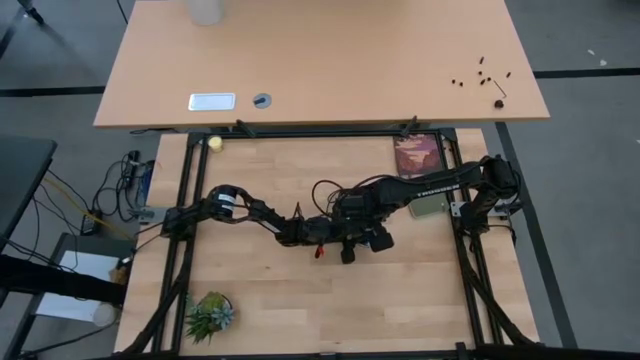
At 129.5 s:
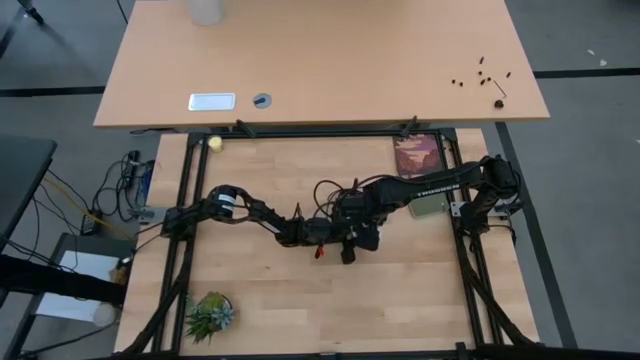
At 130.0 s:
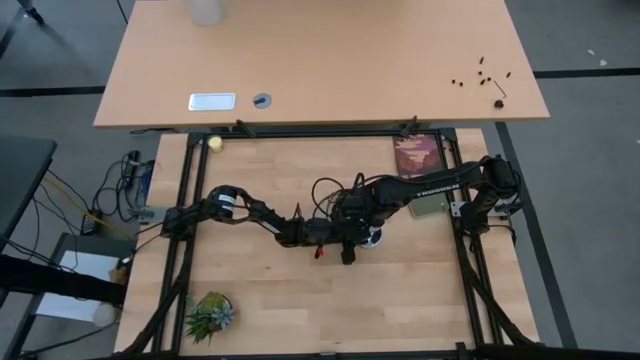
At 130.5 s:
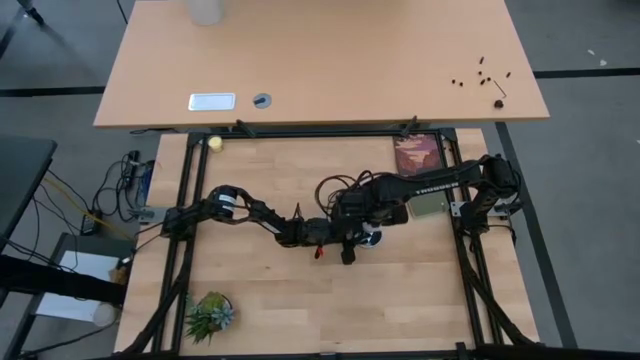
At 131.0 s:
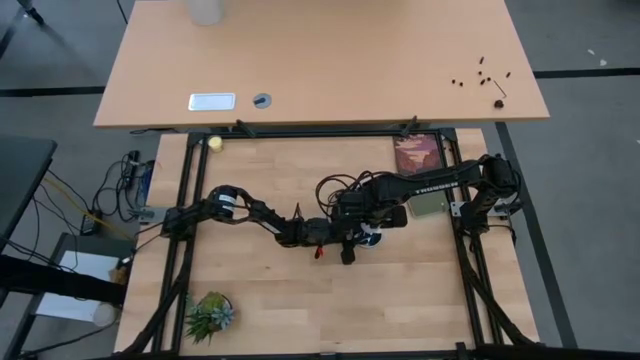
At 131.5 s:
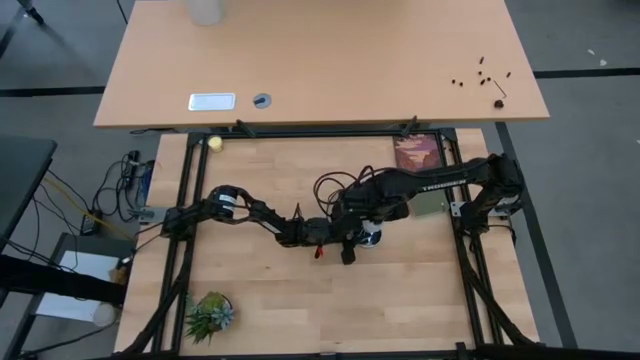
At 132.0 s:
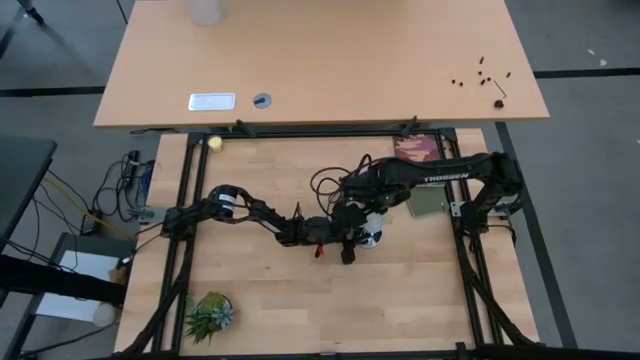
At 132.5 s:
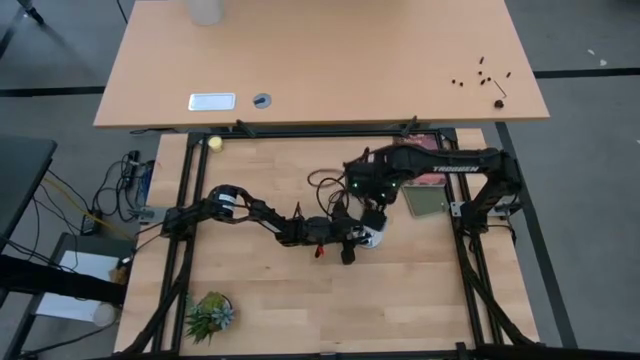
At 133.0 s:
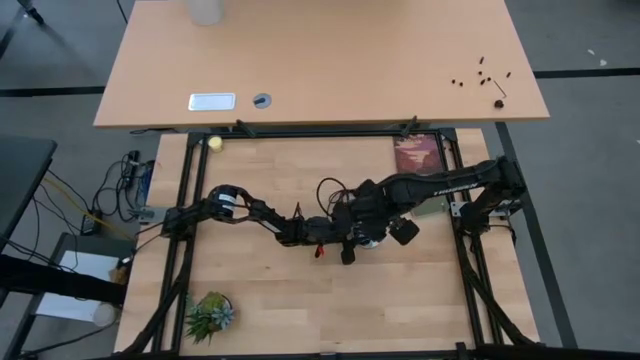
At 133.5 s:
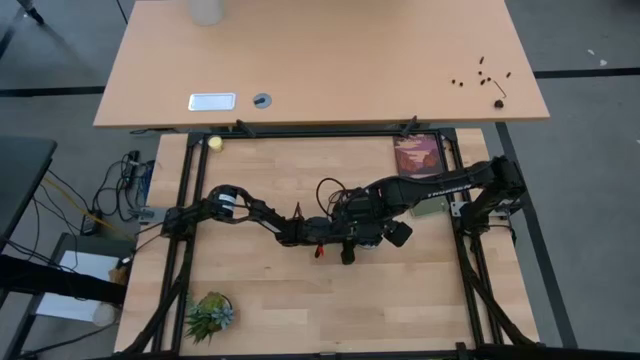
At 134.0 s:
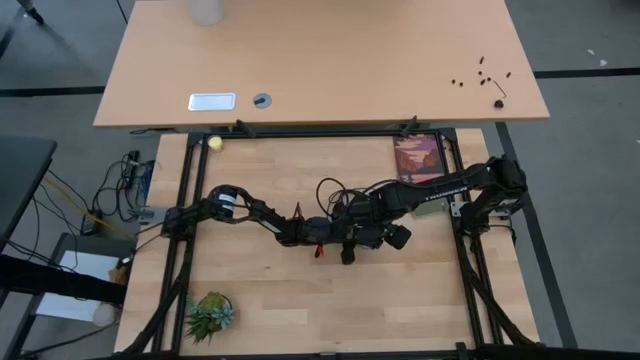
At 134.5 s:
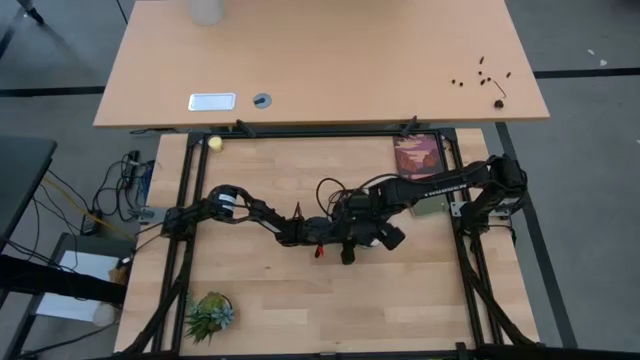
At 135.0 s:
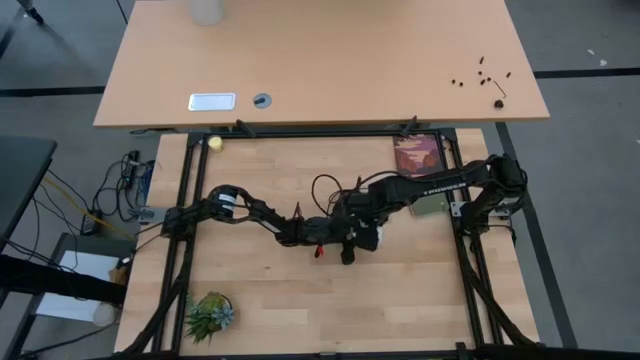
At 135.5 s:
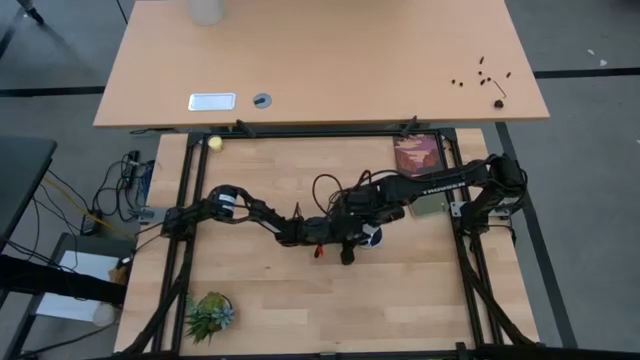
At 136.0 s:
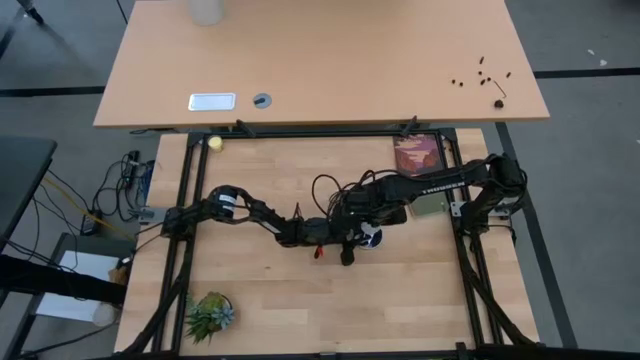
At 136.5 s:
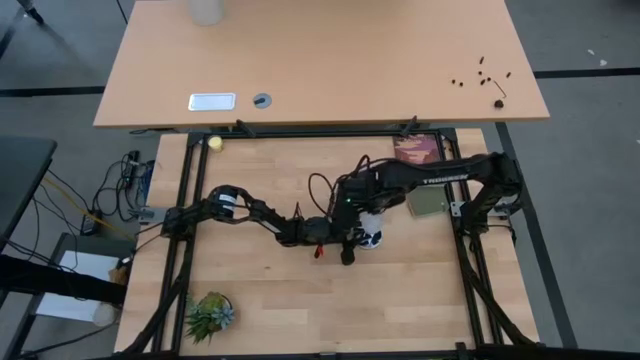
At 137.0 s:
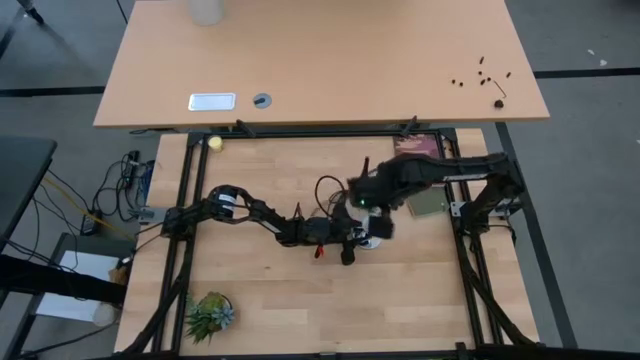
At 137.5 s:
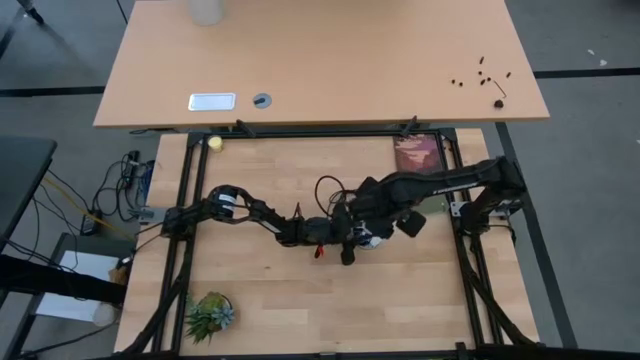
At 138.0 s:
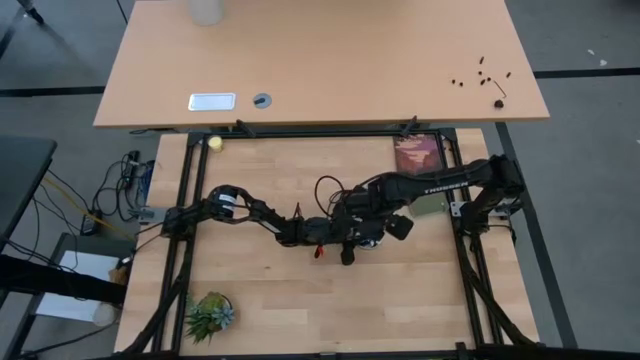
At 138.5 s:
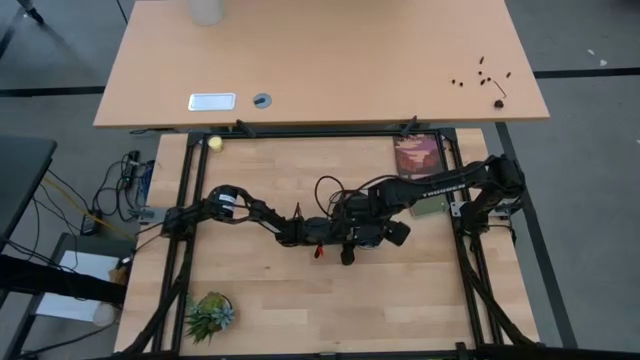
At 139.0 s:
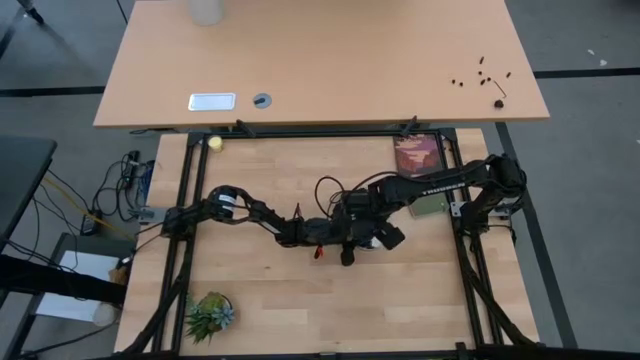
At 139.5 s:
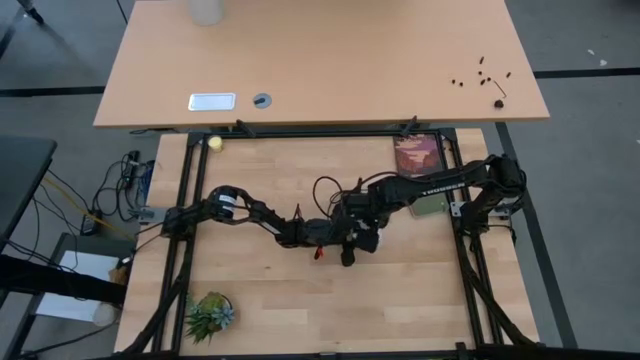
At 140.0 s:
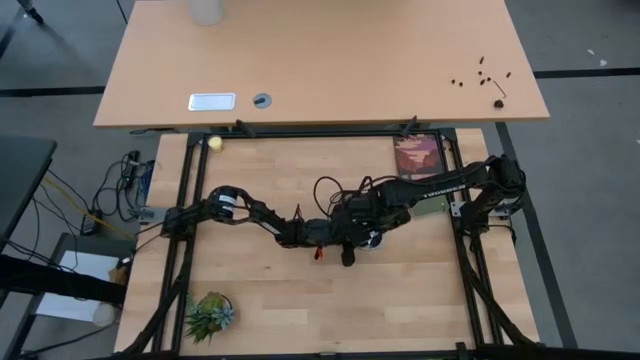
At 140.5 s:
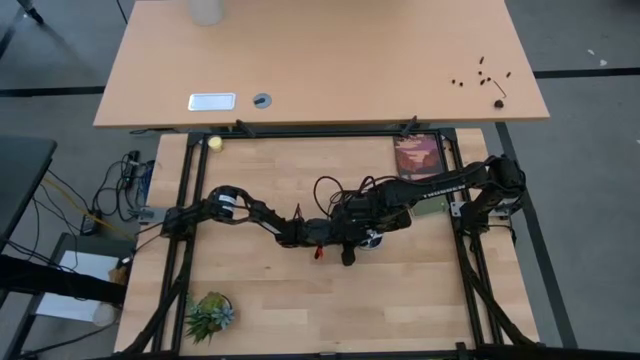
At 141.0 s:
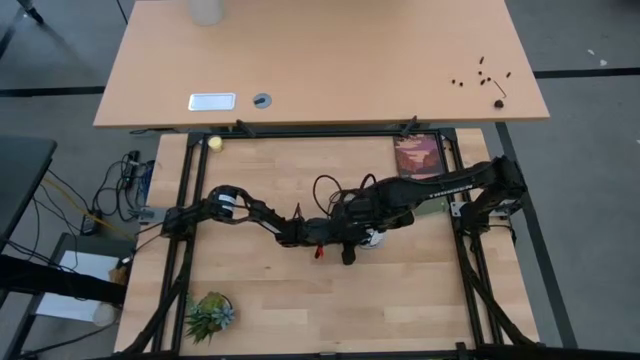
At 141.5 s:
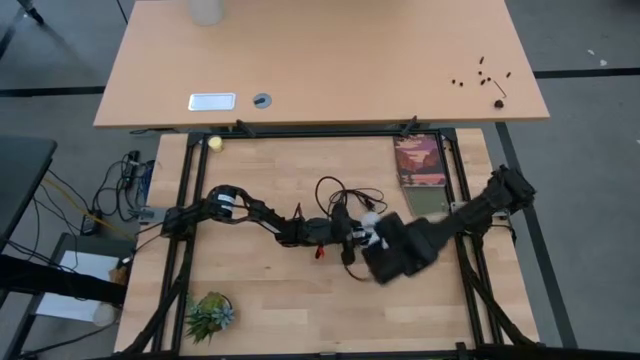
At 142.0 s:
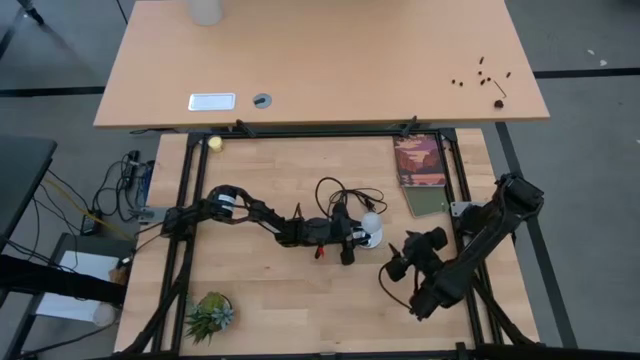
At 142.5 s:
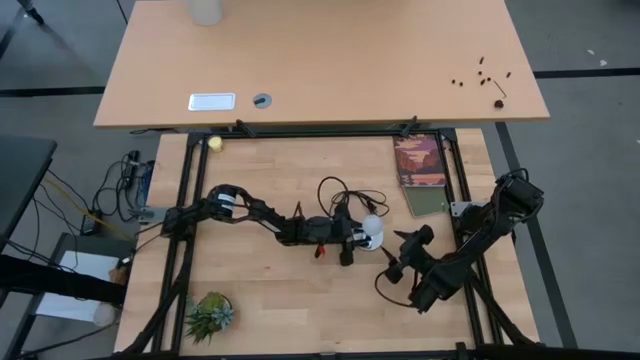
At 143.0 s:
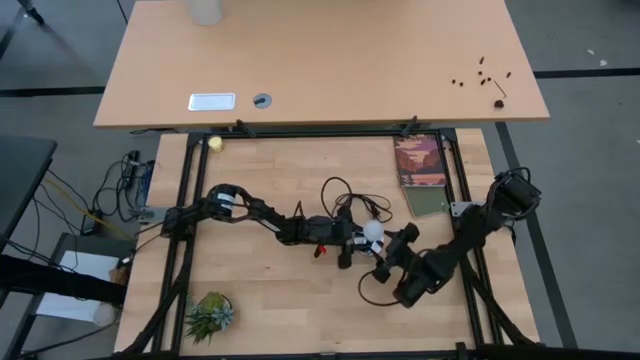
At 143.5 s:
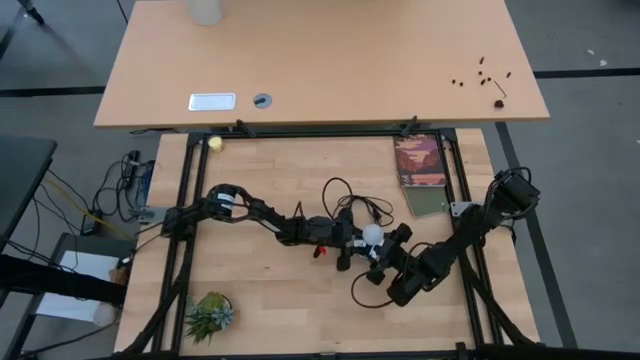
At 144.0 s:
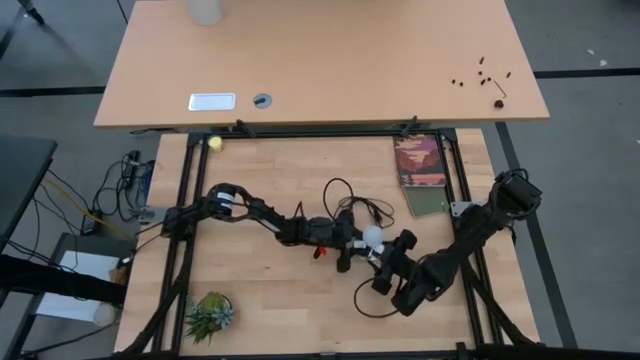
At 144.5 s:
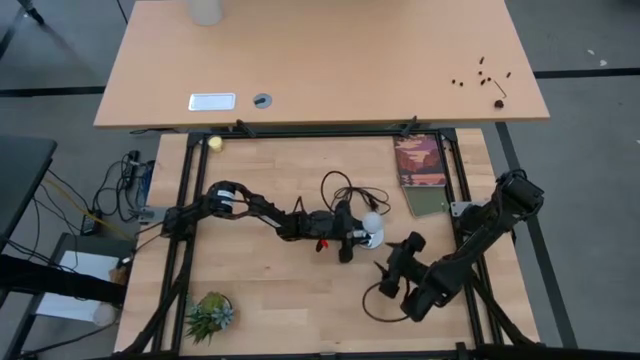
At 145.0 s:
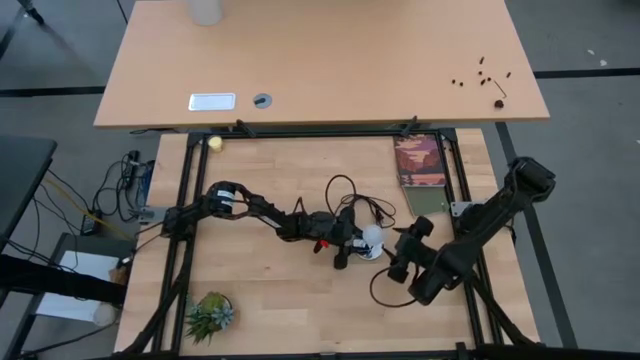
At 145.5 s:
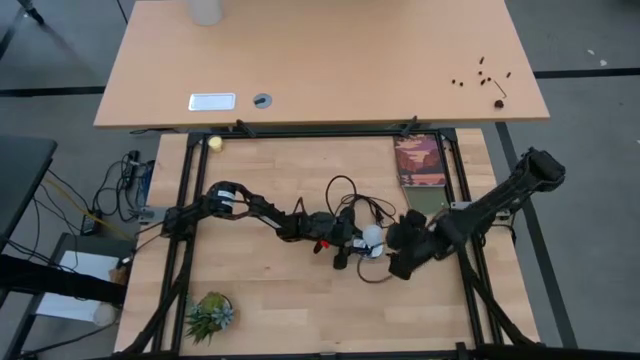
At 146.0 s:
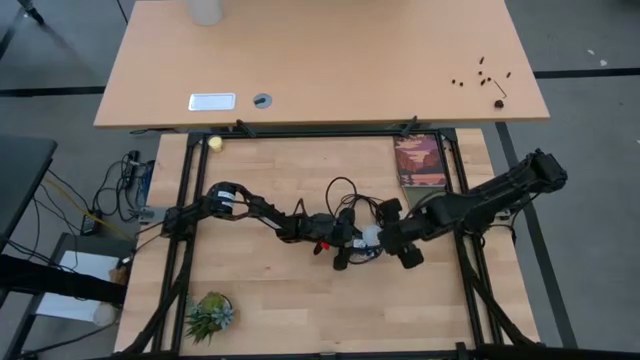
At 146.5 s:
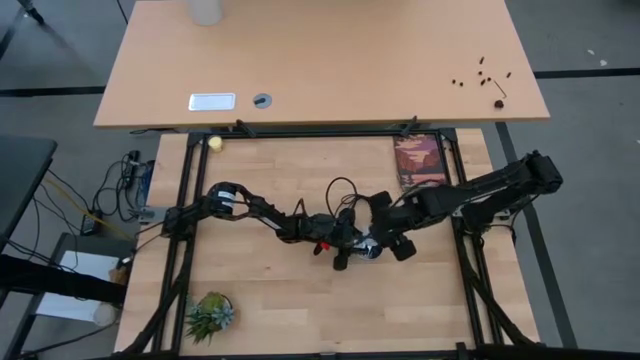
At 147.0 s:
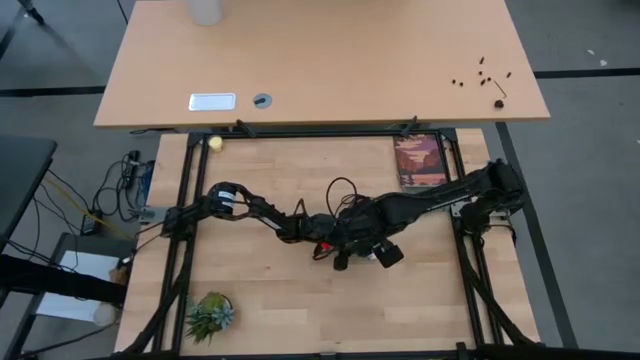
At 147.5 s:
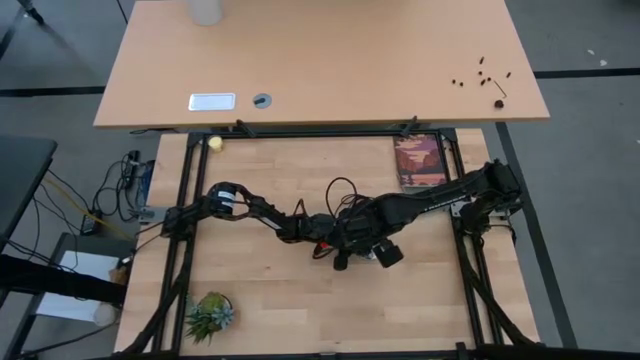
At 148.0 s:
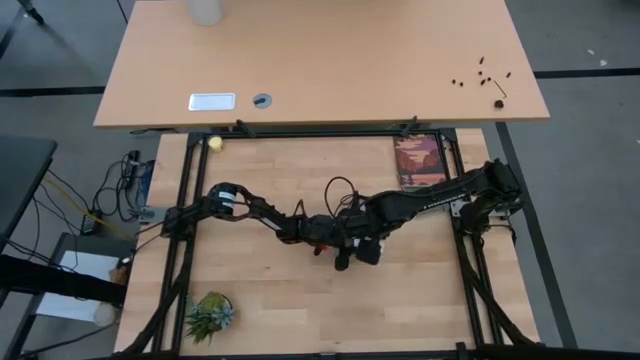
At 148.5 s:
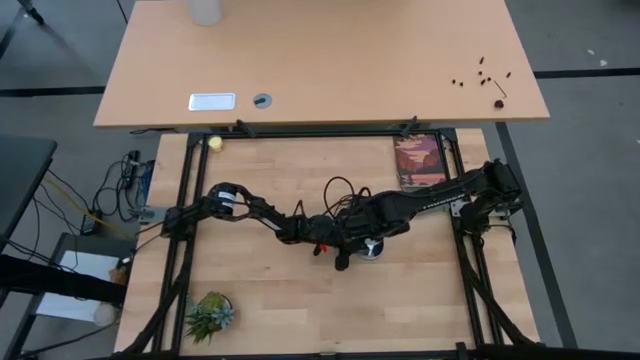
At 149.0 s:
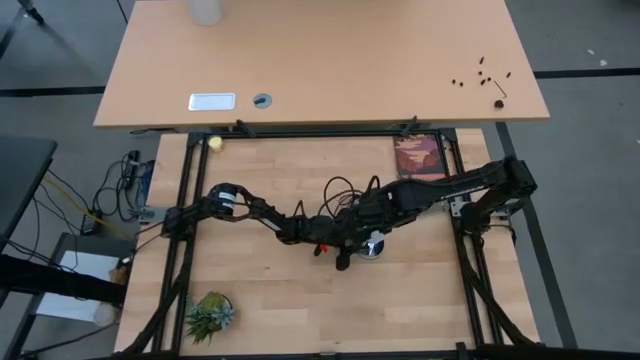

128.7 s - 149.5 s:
Task: Screw lightbulb
Insert the lightbulb into the silver lamp

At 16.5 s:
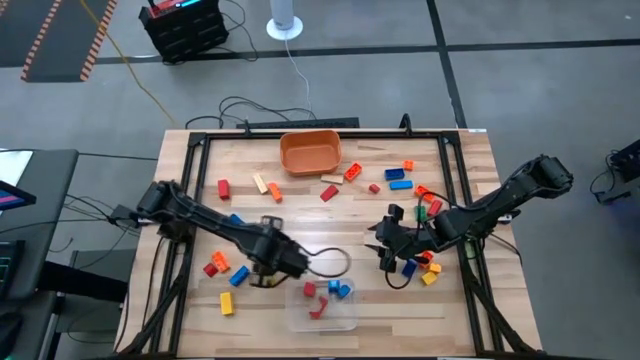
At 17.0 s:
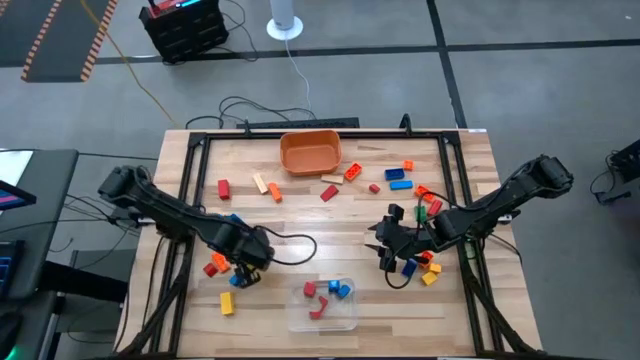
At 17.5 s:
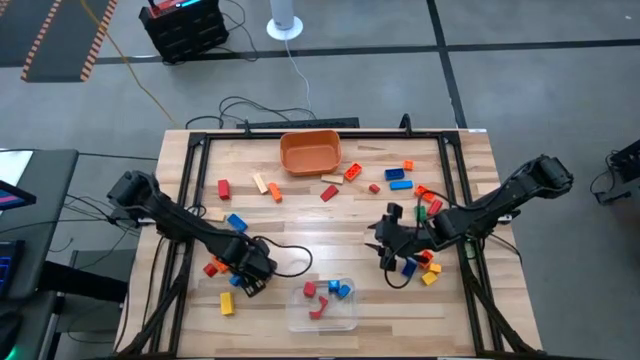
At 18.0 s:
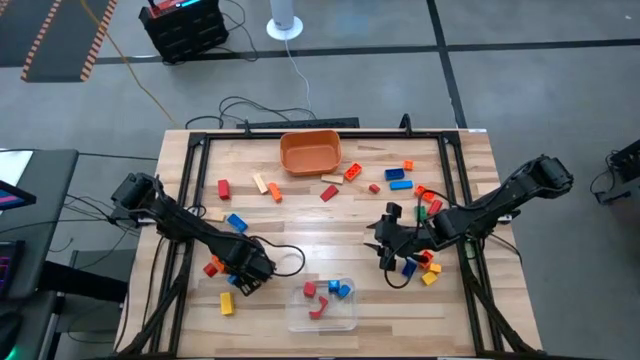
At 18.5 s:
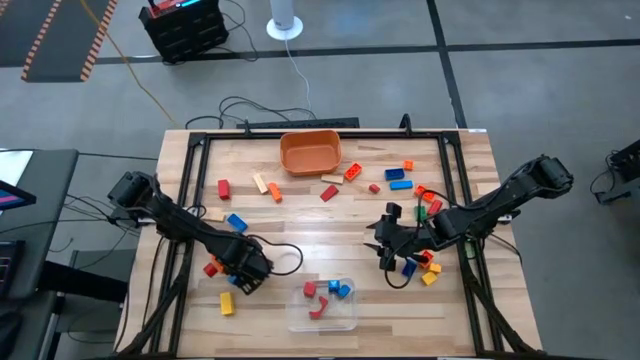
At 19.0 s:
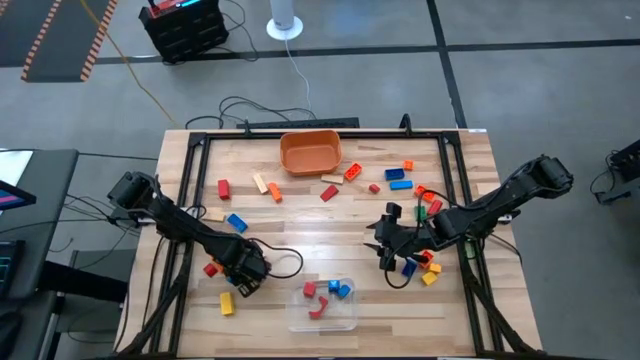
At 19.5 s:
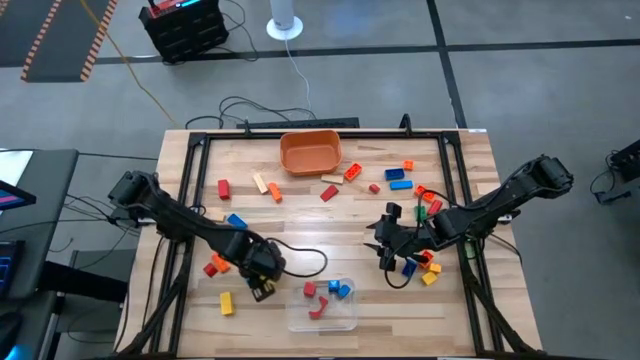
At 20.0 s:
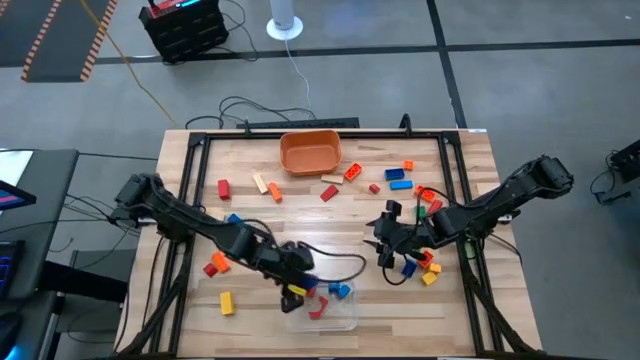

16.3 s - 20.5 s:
Task: Sort blocks by size
Put the large blue game piece into the transparent bin
